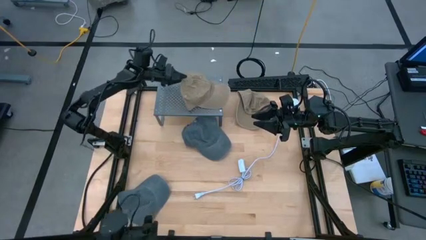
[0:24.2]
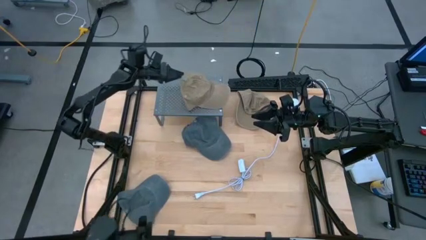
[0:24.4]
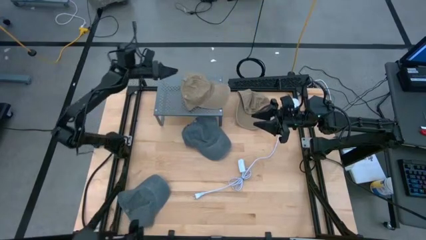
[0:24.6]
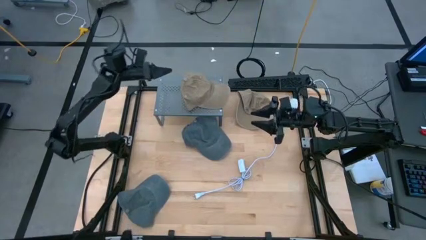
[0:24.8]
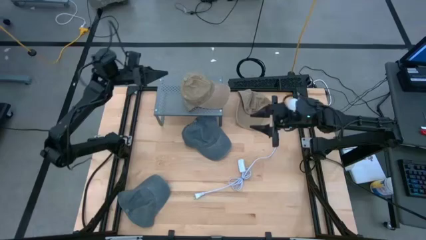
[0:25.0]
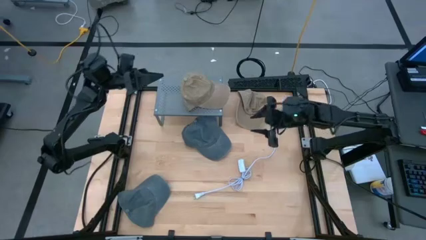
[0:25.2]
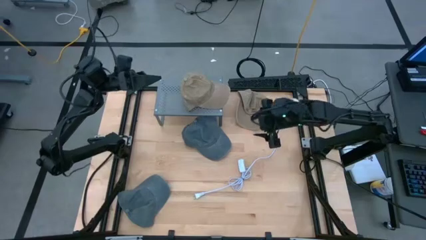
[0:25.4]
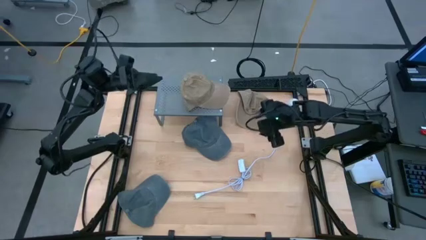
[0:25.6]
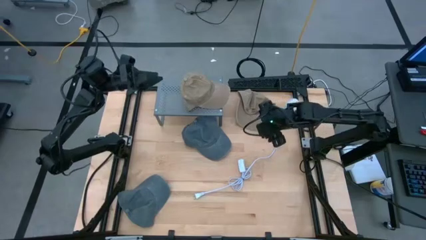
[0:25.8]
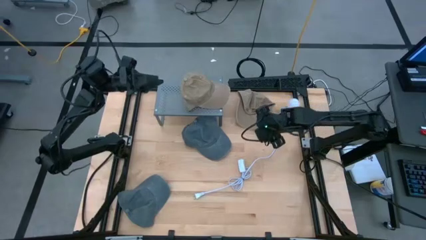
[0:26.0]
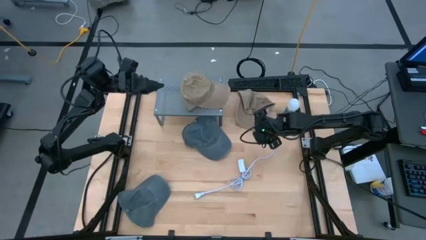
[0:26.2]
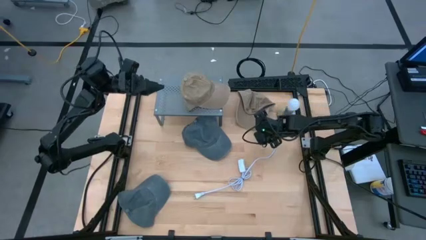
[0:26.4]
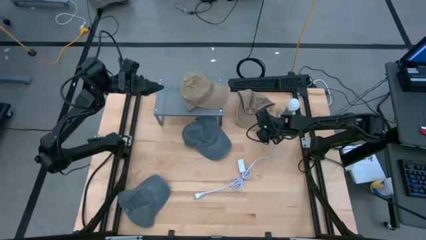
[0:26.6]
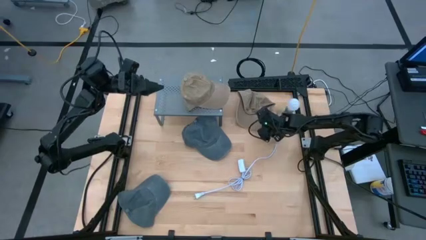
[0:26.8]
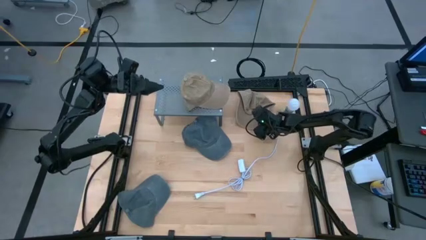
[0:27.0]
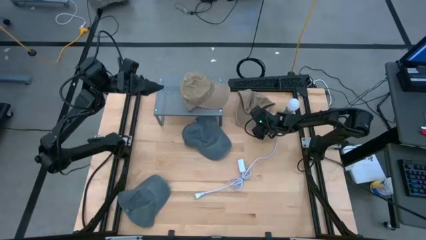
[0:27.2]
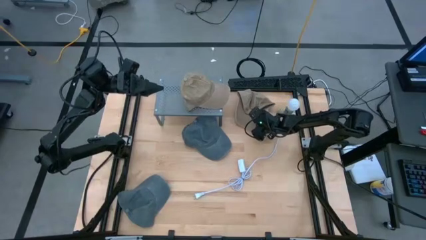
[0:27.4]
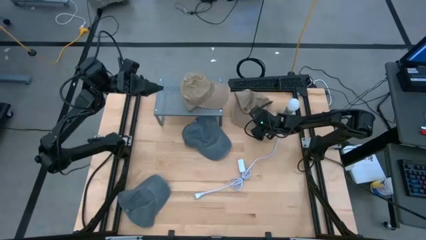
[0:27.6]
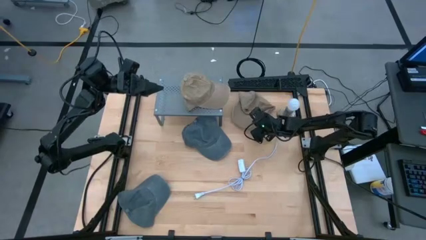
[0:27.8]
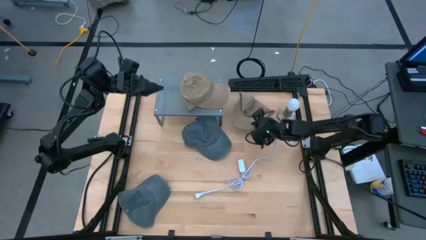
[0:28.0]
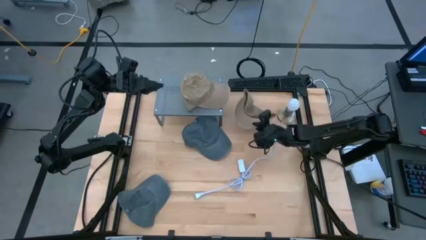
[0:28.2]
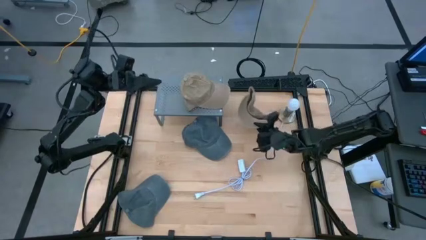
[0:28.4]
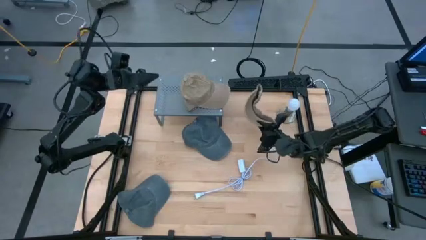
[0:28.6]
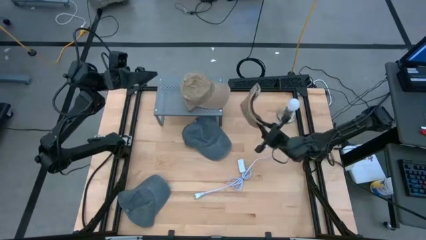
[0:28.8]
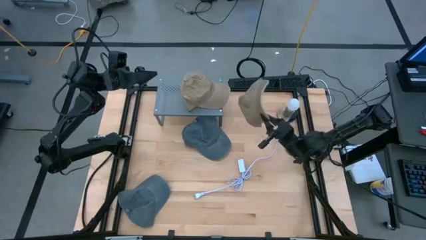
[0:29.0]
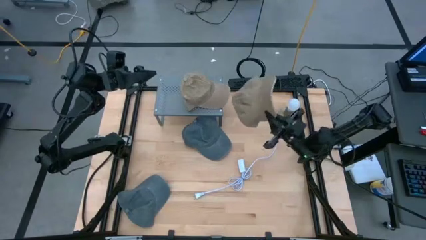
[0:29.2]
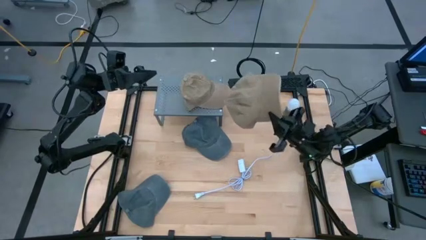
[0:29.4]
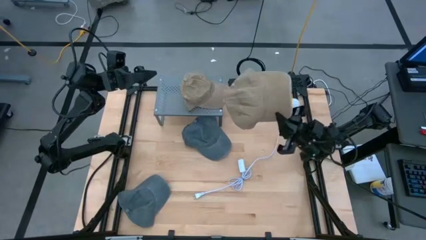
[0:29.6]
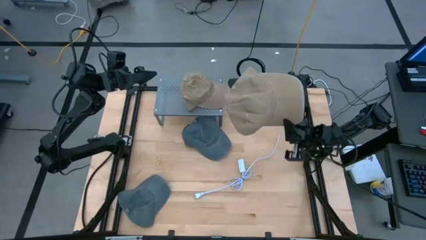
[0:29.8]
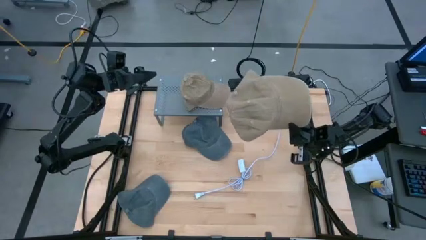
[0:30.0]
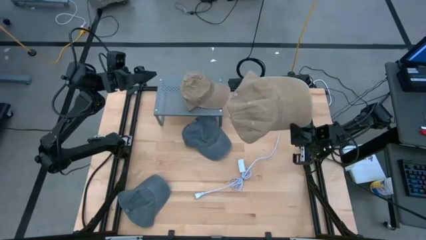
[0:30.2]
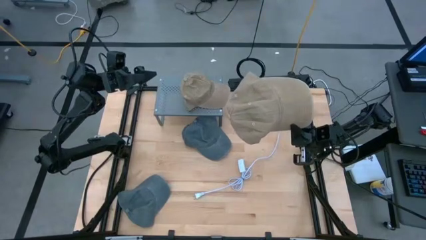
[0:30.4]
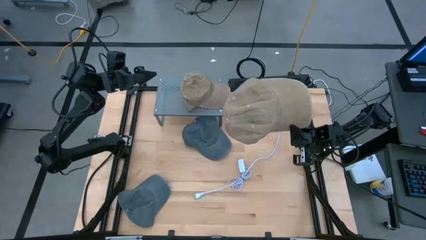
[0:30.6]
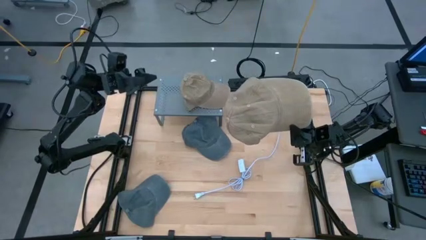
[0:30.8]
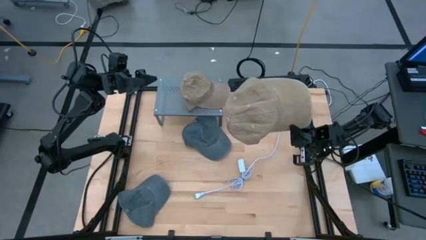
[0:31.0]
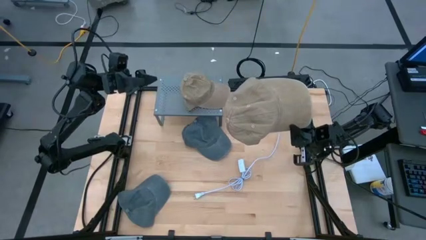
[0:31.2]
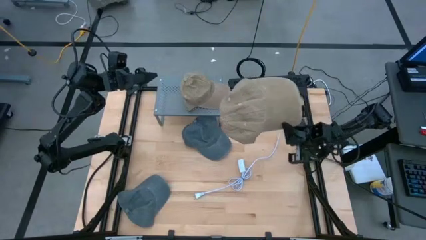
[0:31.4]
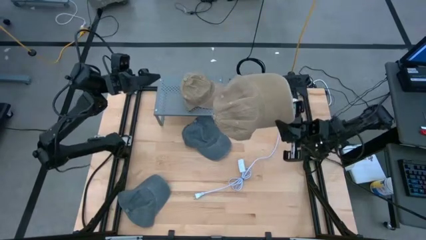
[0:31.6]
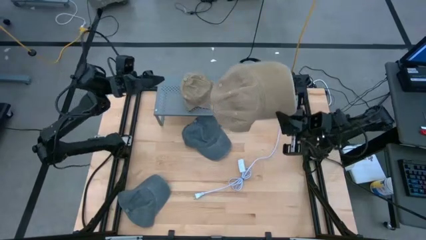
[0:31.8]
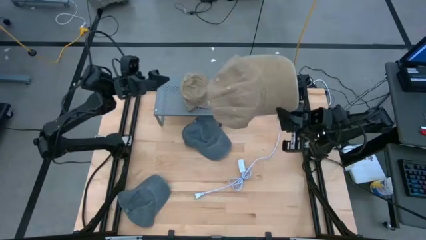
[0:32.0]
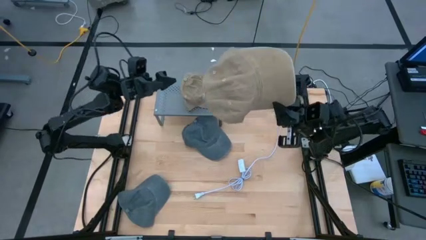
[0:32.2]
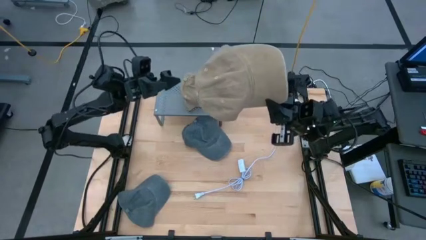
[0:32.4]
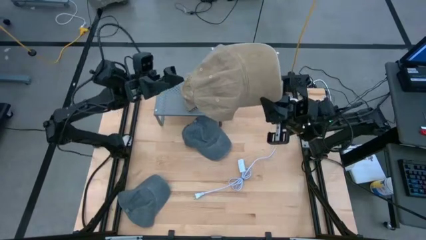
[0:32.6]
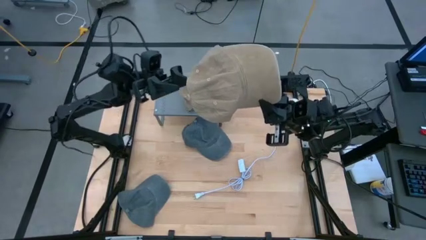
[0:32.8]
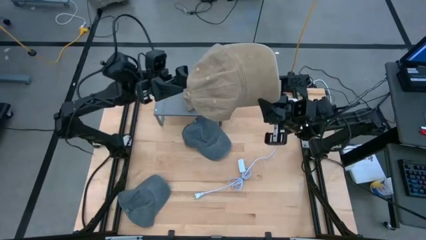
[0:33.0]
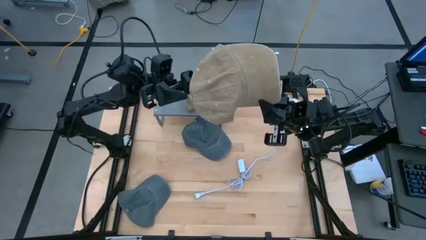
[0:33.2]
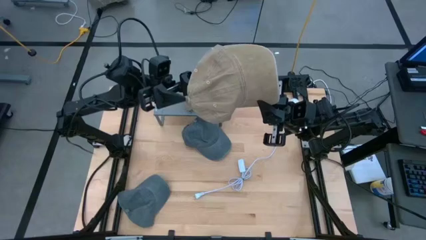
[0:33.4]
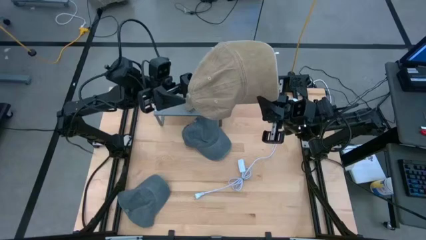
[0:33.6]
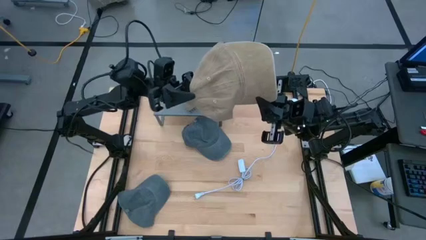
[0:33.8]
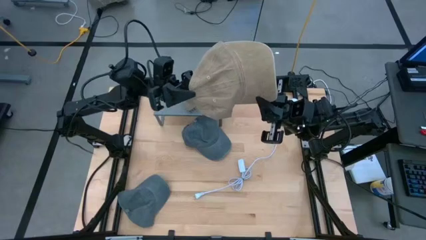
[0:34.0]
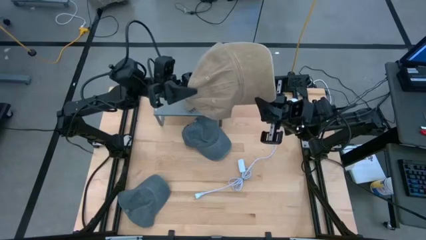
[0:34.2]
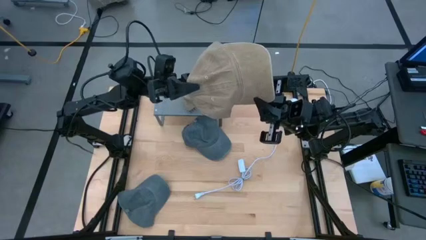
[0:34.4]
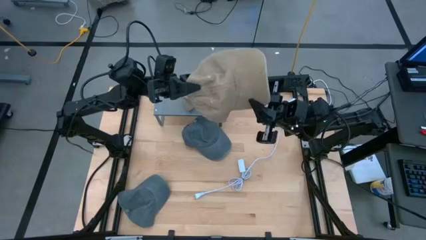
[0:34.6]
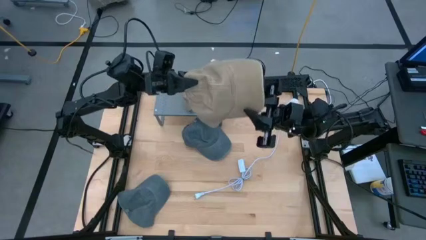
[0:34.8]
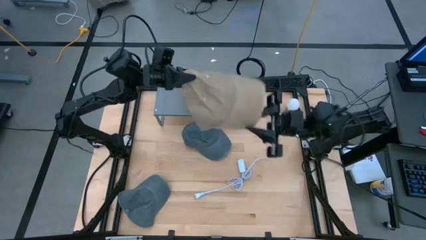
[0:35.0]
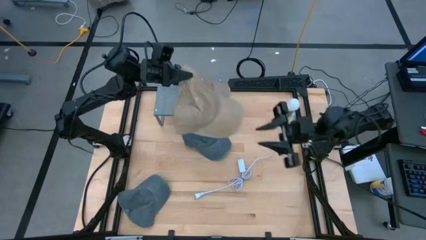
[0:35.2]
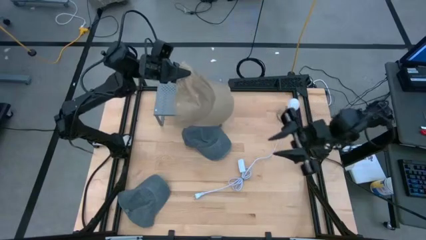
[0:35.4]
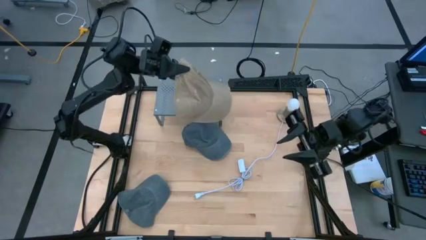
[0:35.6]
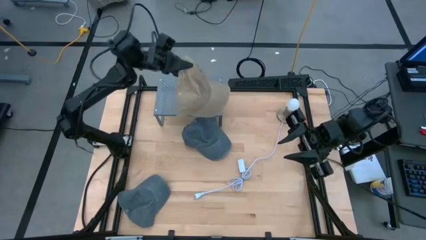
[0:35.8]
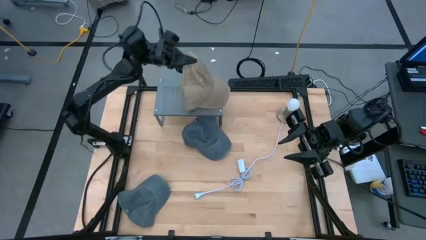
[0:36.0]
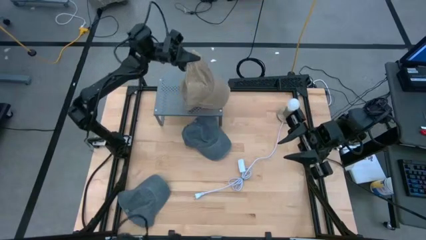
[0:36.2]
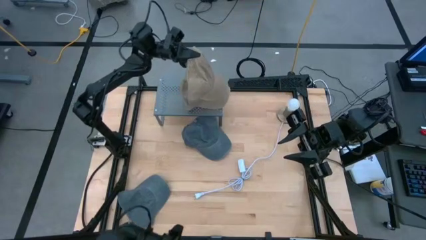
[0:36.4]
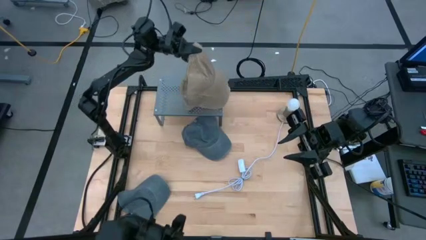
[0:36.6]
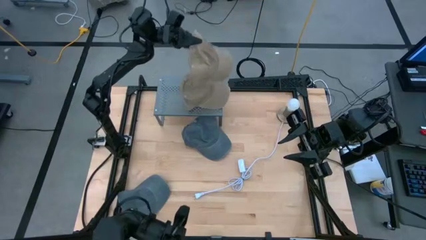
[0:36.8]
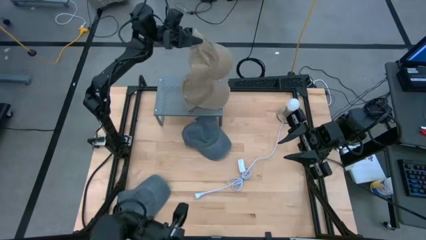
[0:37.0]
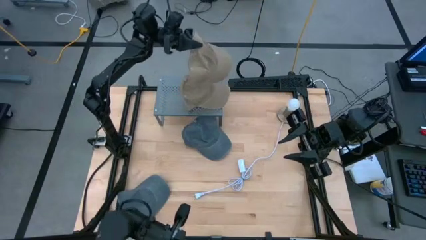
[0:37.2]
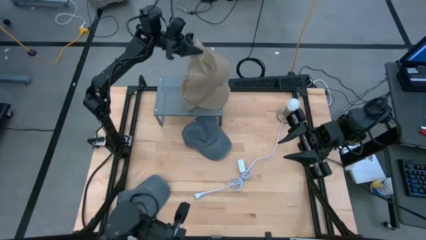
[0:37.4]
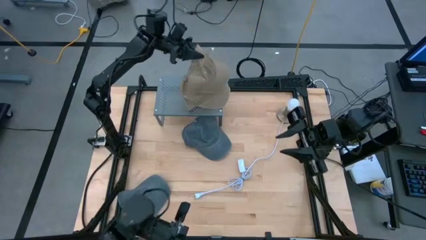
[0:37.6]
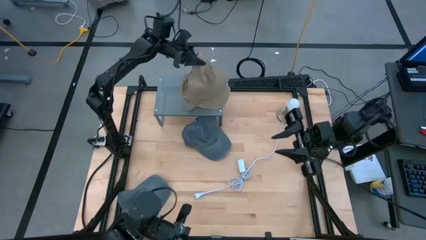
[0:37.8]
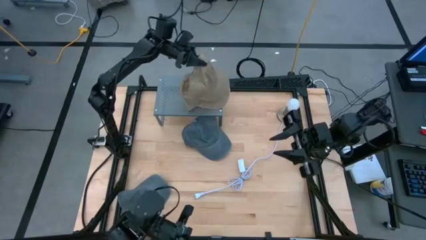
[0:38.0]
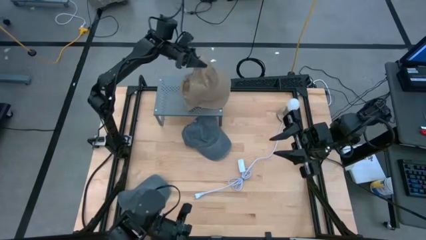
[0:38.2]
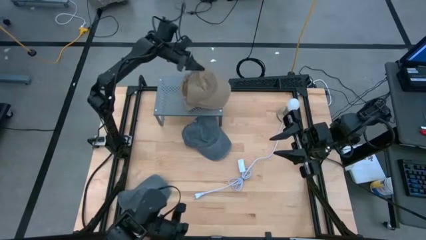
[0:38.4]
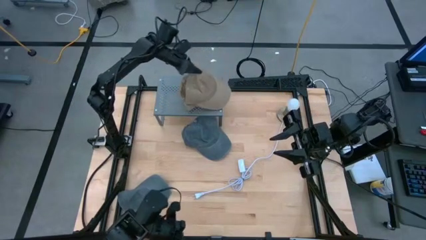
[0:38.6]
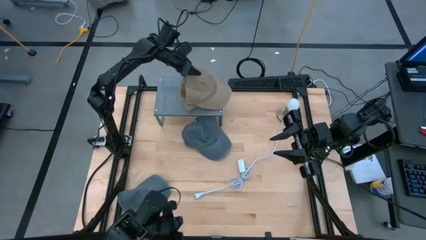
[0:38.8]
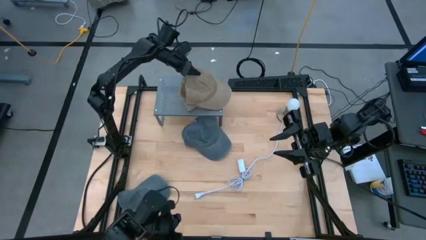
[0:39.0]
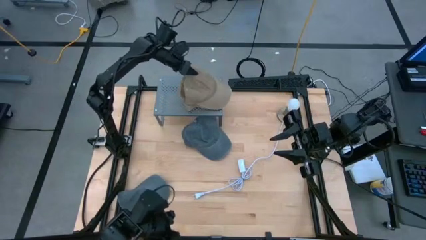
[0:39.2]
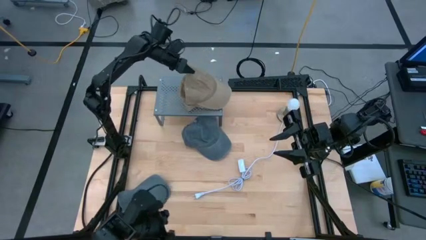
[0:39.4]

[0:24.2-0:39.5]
Task: Pick & Place hat
Stack the brown cap on top of the brown cap on the shelf
